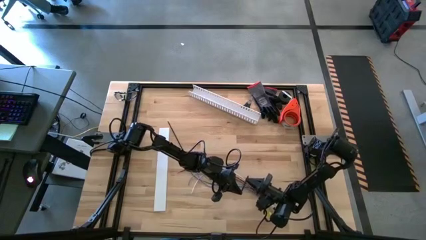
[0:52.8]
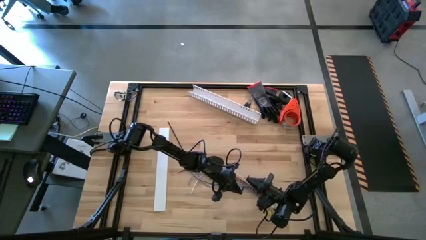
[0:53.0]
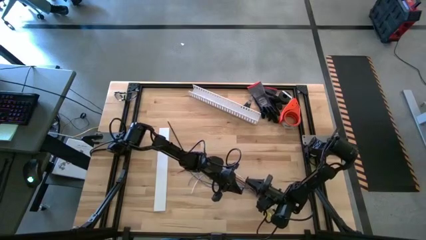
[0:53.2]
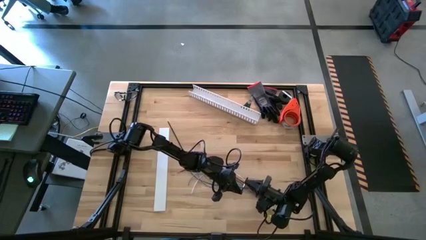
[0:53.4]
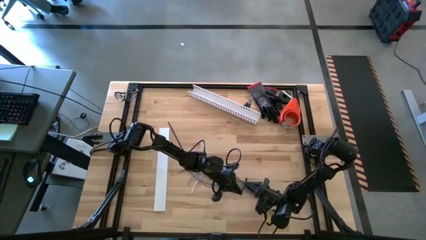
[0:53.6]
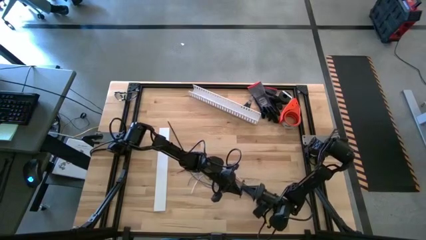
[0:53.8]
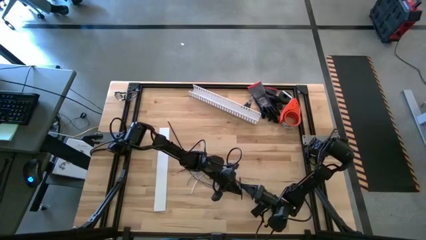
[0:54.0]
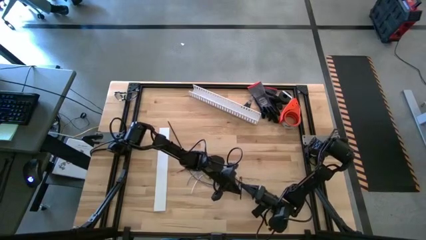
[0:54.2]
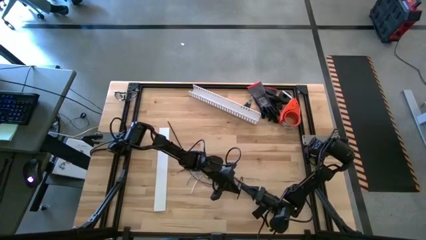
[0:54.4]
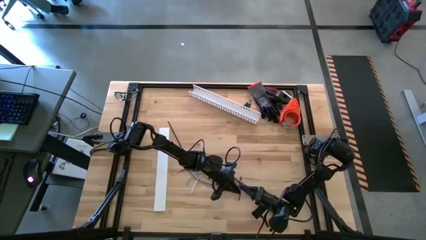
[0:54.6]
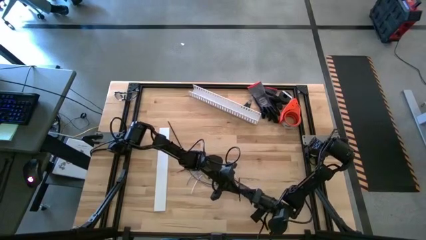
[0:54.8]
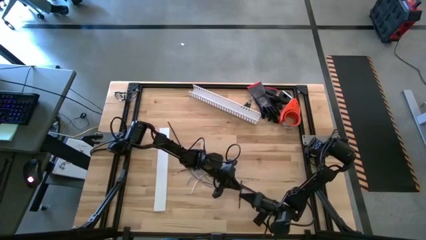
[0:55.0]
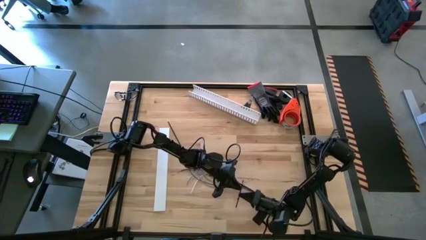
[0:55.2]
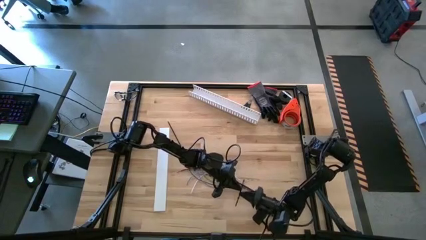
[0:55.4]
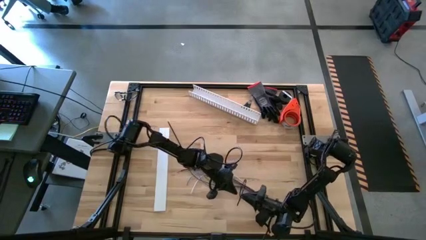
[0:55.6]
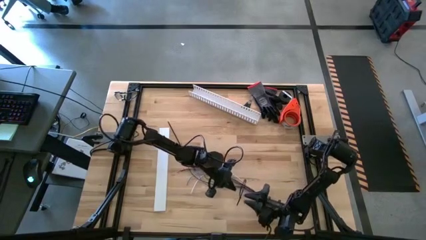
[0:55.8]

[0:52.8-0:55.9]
Task: Ziptie cables
Wrap the right zip tie on the cable

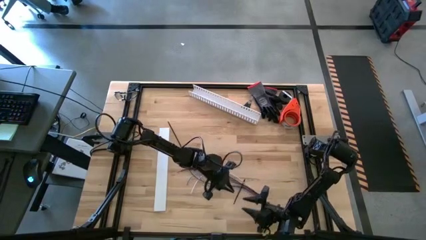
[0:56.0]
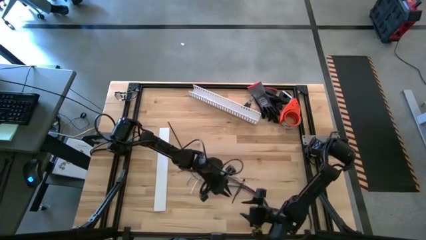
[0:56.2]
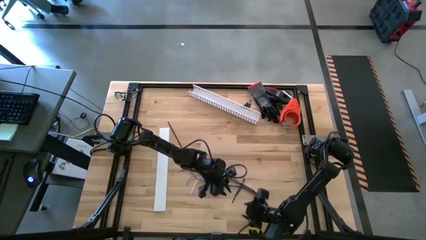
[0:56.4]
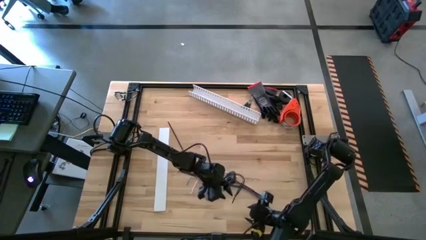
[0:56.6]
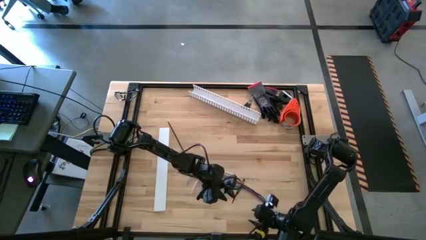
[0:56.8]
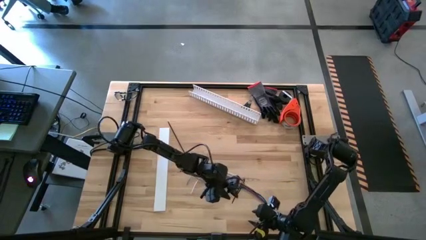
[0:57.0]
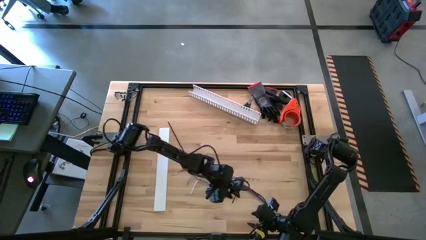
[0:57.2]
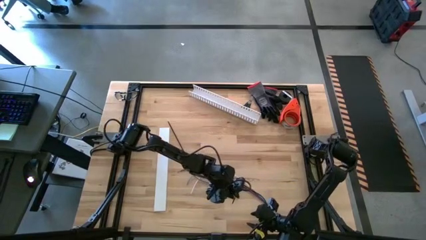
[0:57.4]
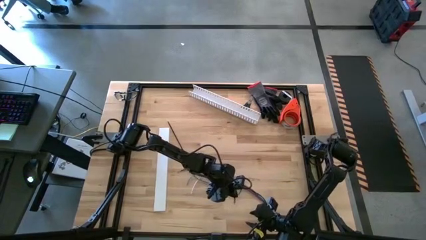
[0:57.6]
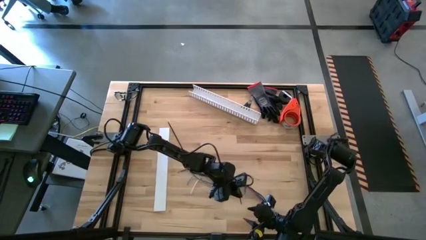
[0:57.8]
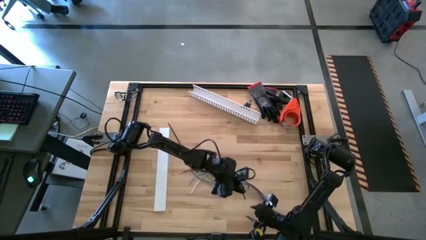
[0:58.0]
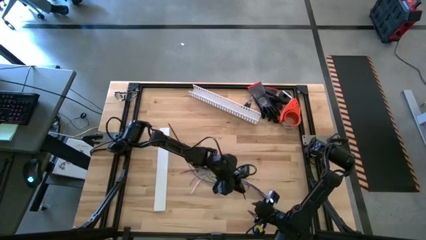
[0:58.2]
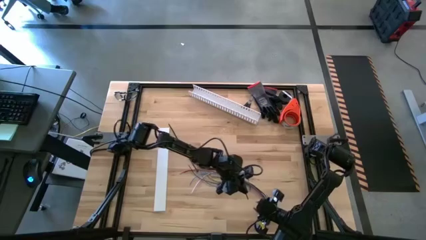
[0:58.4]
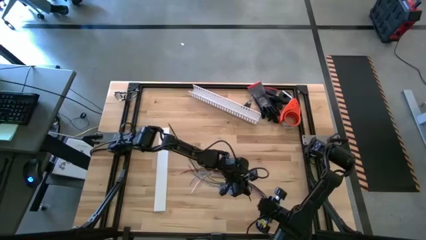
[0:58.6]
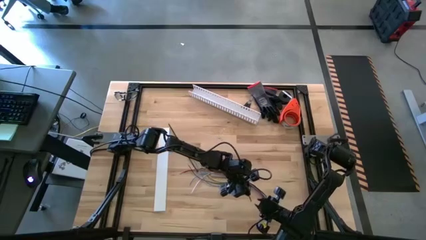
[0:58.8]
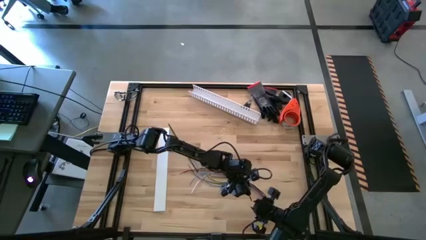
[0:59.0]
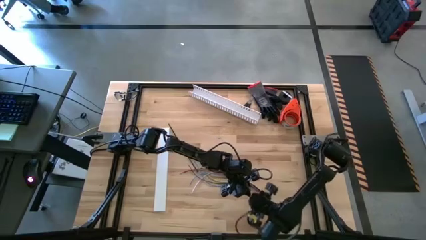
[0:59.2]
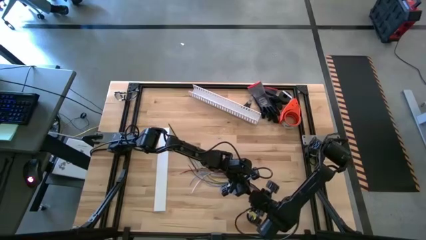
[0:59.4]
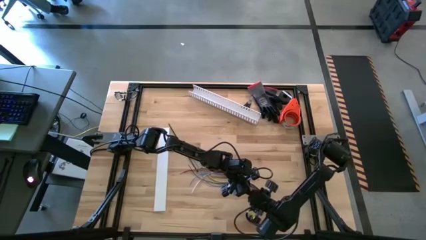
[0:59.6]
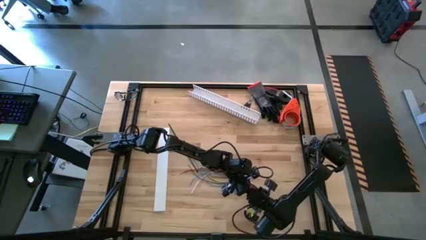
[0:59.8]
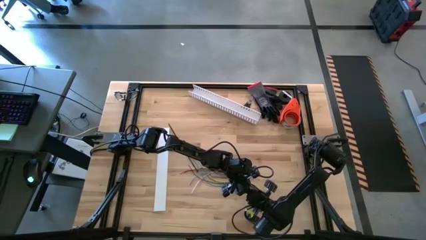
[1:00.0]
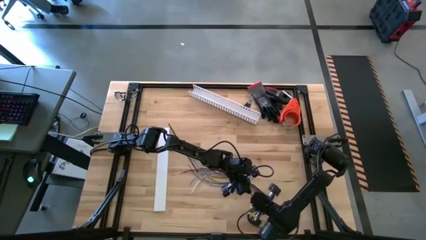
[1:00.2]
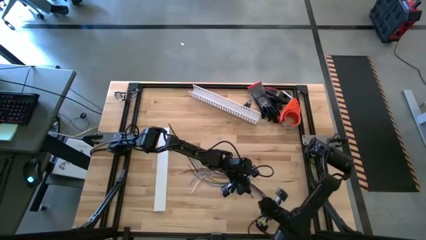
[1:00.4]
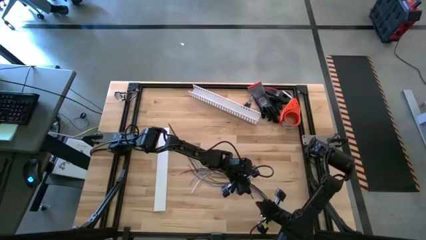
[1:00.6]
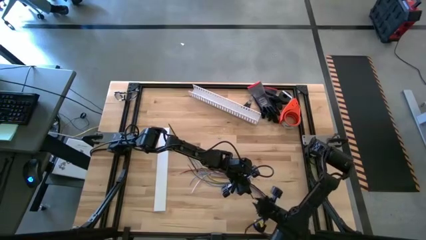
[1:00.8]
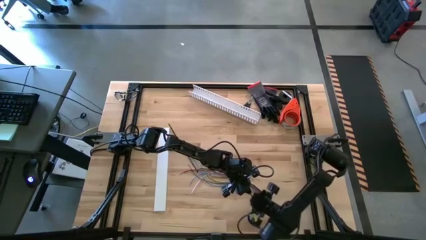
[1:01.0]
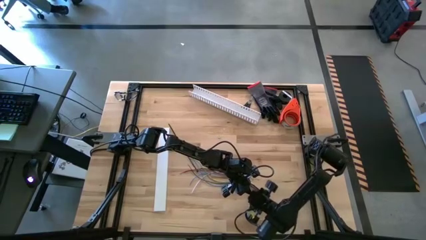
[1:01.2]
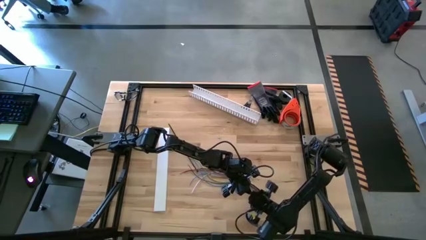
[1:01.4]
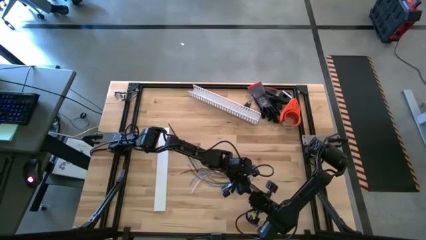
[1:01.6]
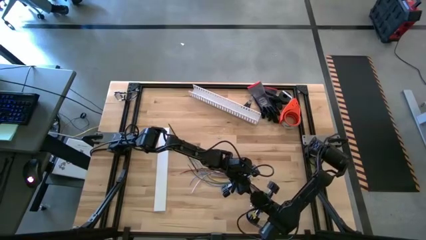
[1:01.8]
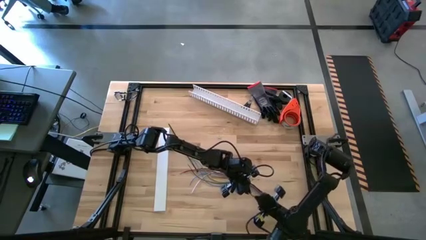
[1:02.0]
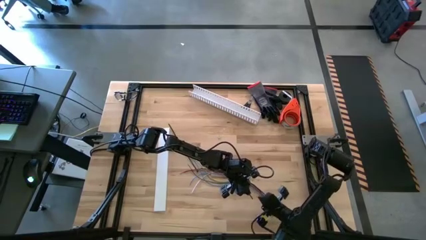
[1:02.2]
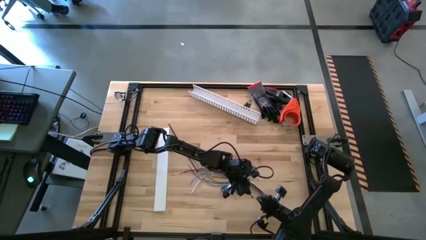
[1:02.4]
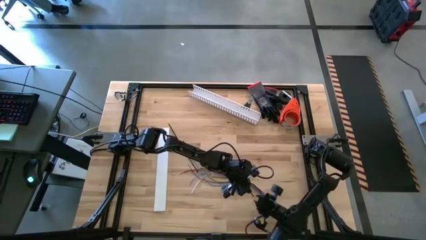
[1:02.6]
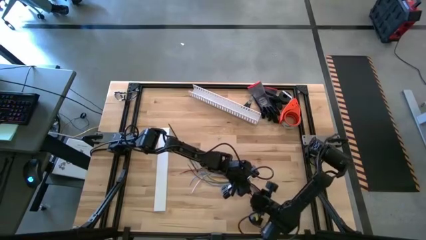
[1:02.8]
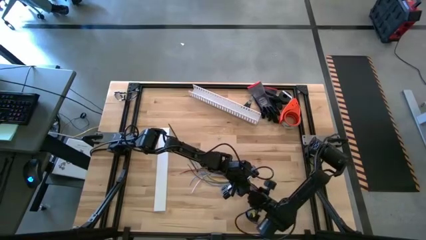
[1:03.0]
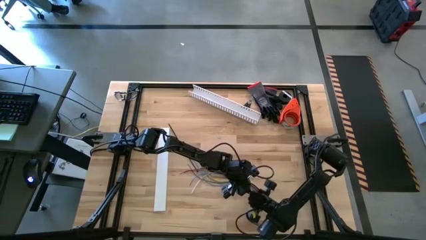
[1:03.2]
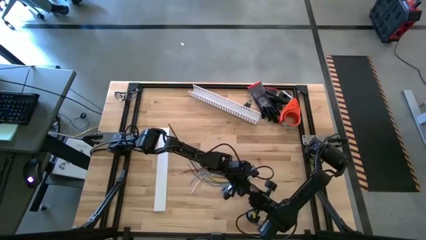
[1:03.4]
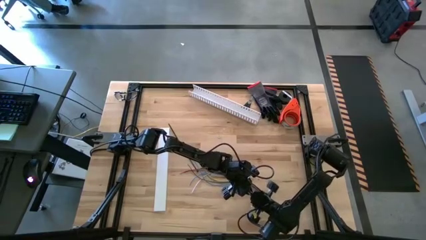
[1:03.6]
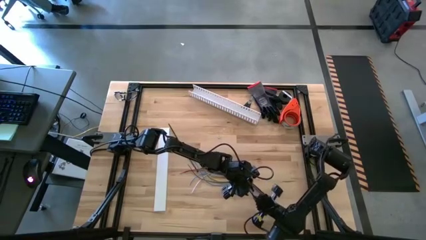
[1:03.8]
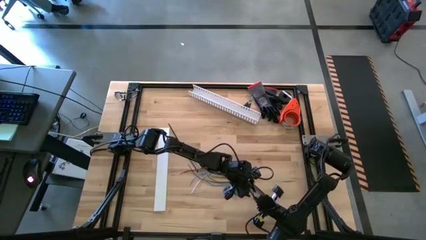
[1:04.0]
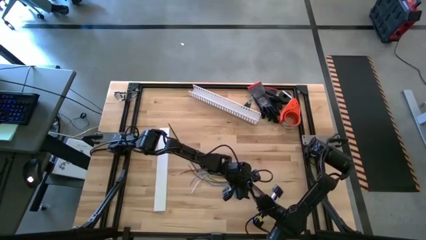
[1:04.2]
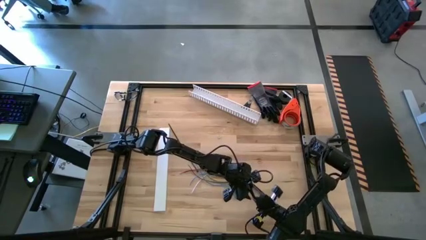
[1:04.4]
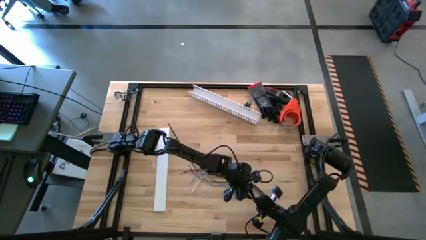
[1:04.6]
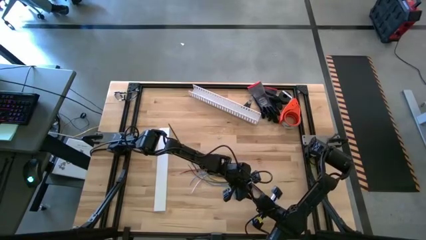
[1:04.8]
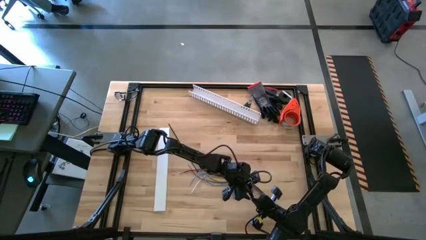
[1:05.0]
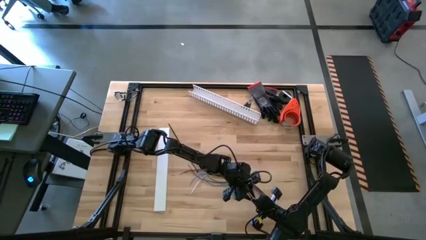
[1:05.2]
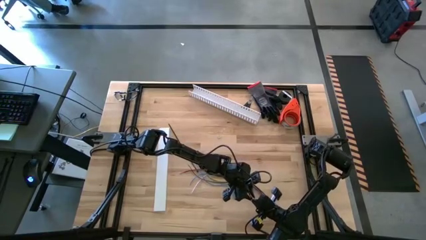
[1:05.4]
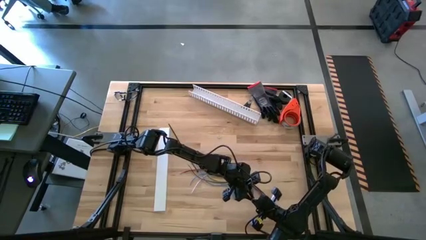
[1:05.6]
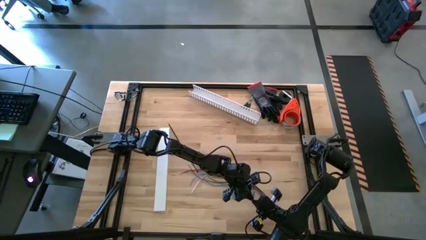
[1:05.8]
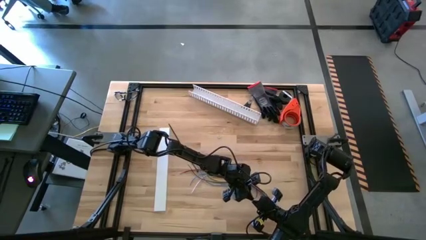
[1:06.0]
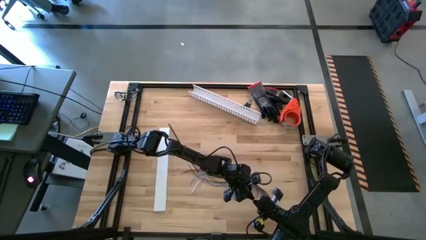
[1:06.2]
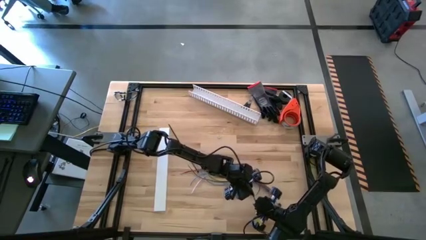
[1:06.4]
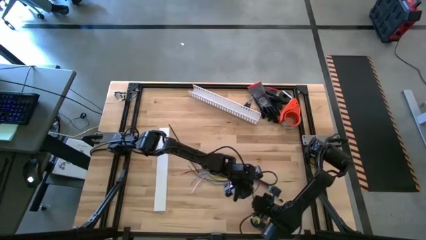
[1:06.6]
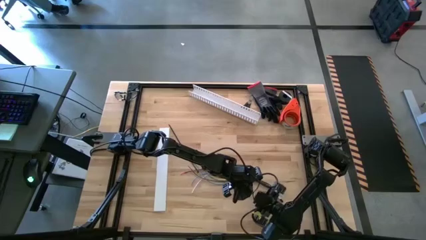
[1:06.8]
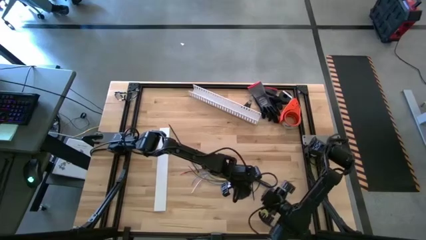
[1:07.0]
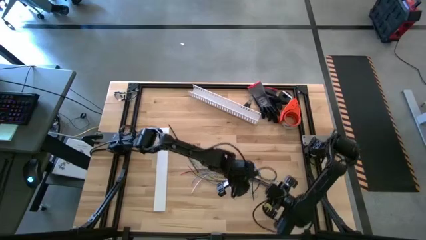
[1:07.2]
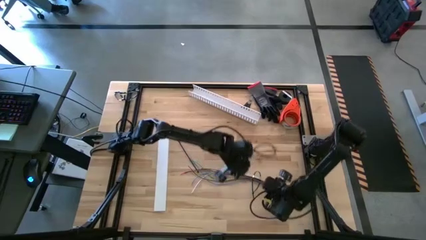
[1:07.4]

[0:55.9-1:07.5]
Wrap the right zip tie on the cable

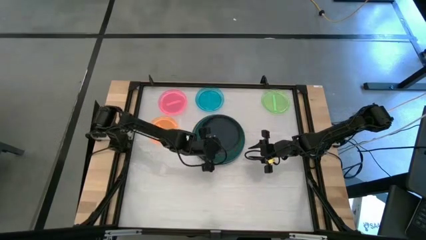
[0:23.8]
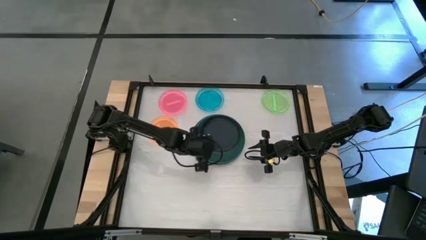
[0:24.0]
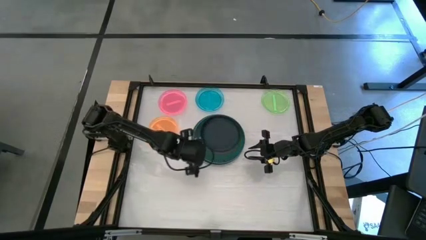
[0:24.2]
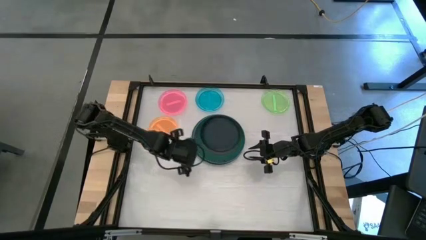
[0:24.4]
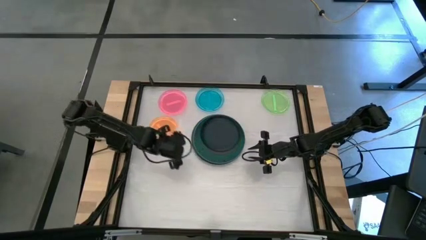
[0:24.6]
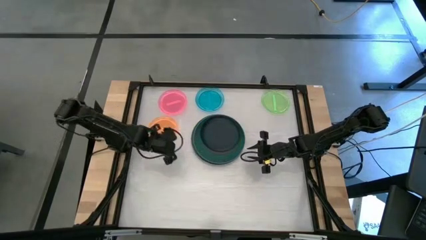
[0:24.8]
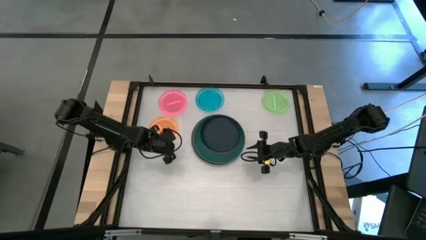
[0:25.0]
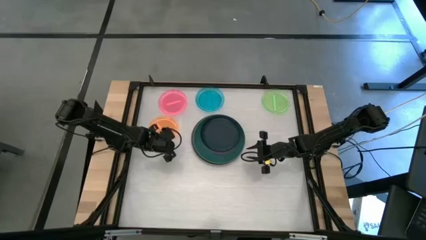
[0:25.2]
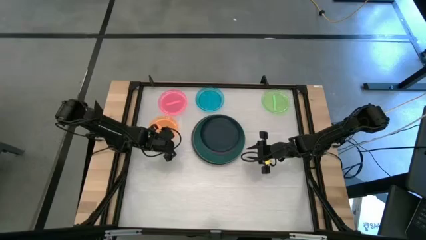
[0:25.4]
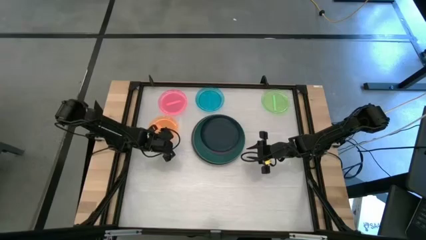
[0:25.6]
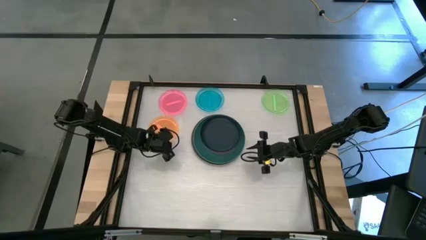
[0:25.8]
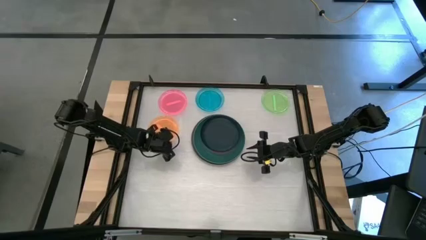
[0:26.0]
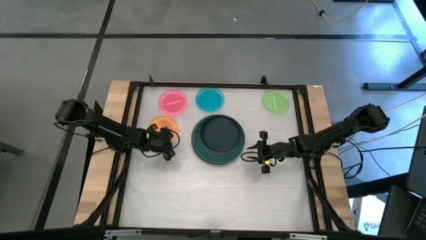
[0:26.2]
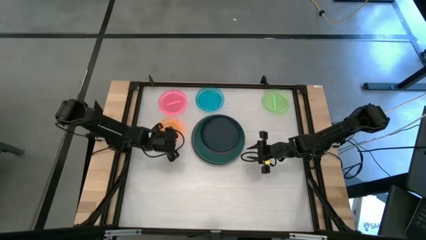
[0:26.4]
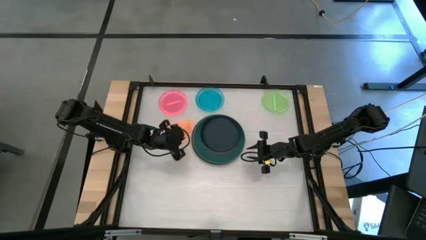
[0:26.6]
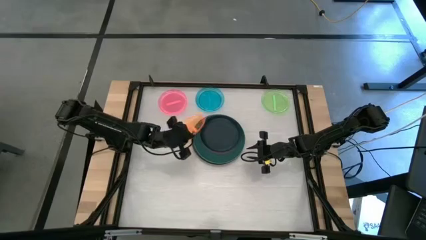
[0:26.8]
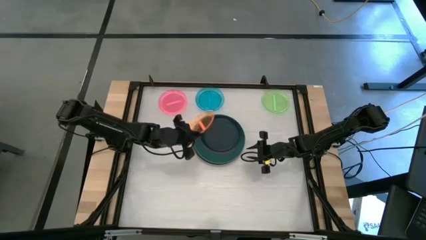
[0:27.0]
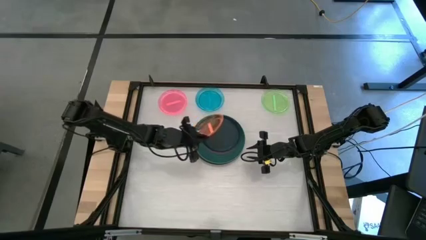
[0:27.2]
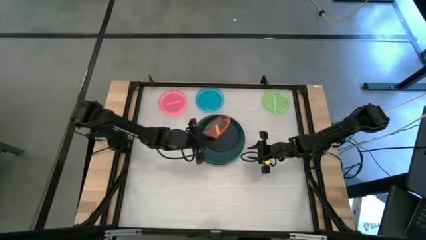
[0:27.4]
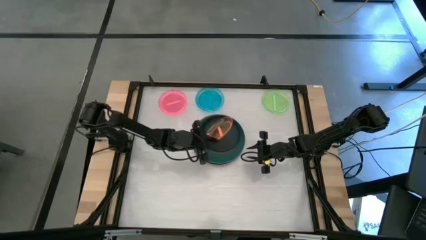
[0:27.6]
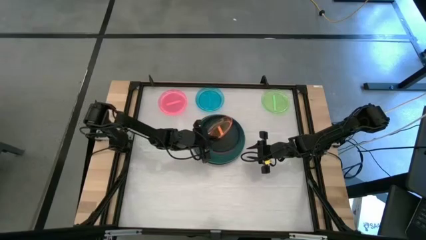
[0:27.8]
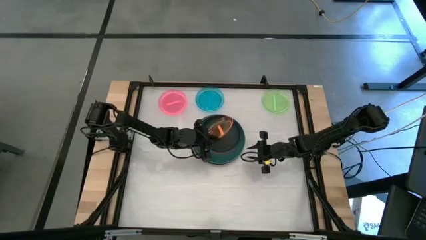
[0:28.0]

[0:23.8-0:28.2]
Task: Stack plastic plates
Stack the transparent orange plate on top of the black plate
